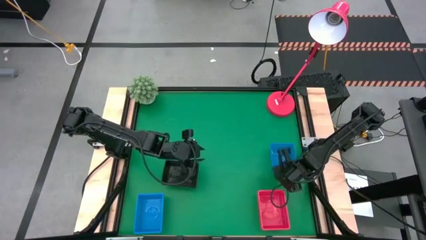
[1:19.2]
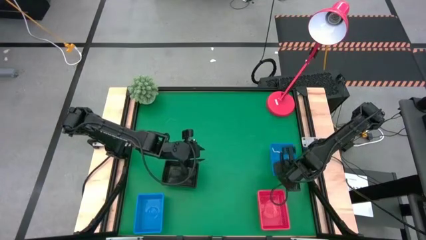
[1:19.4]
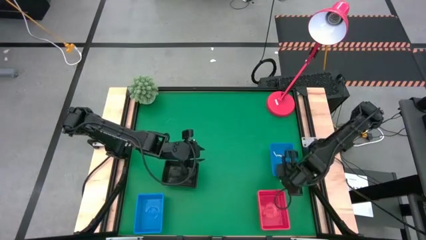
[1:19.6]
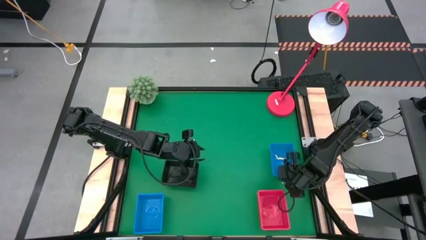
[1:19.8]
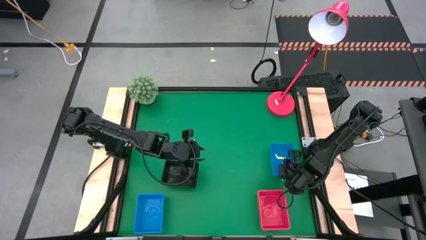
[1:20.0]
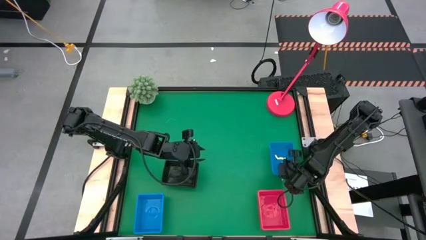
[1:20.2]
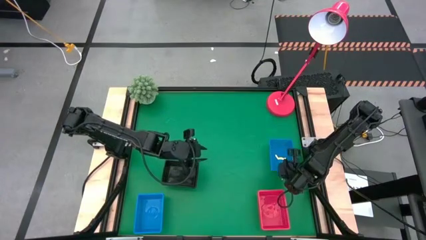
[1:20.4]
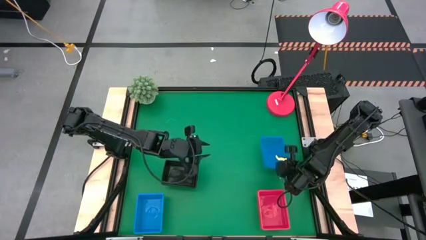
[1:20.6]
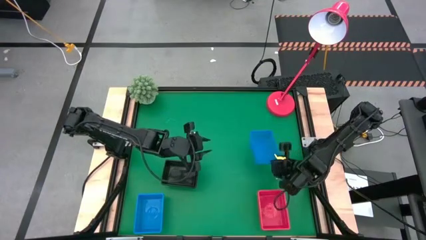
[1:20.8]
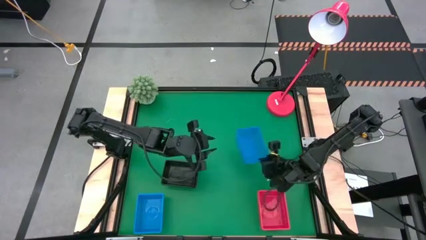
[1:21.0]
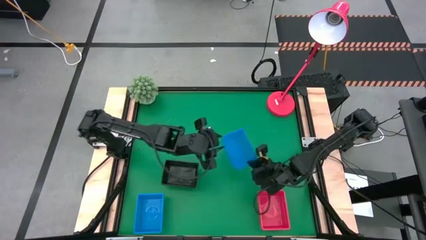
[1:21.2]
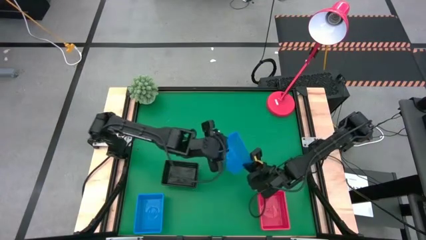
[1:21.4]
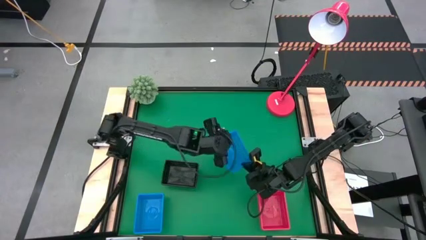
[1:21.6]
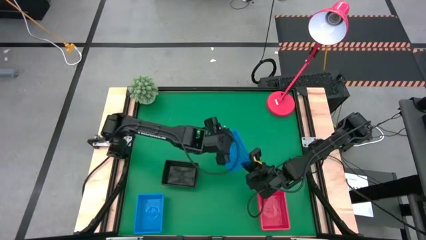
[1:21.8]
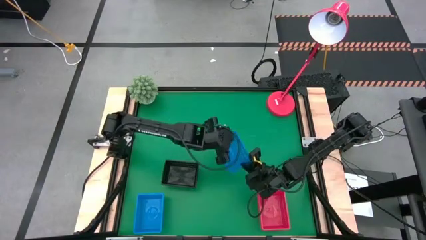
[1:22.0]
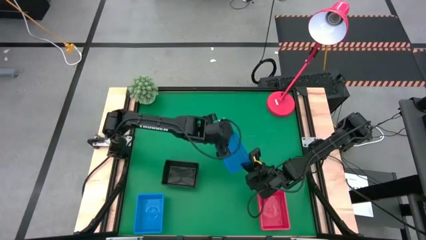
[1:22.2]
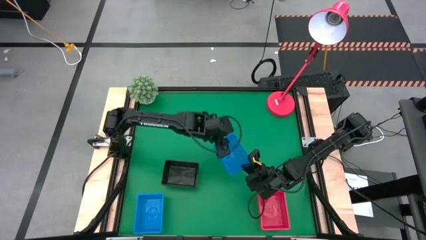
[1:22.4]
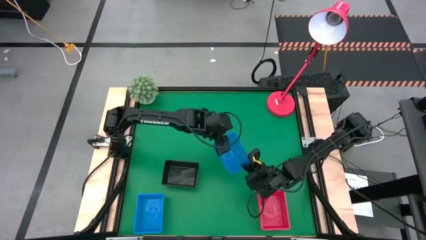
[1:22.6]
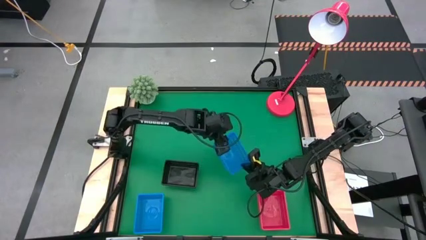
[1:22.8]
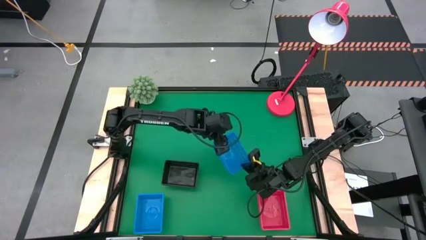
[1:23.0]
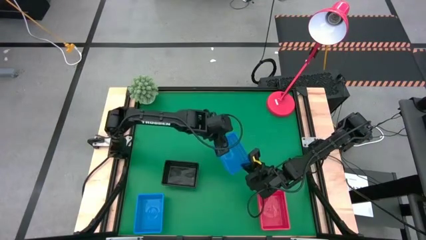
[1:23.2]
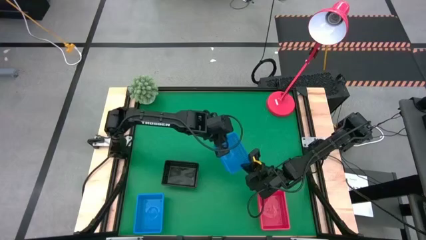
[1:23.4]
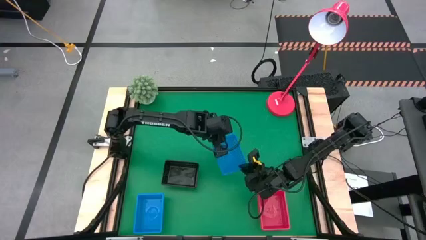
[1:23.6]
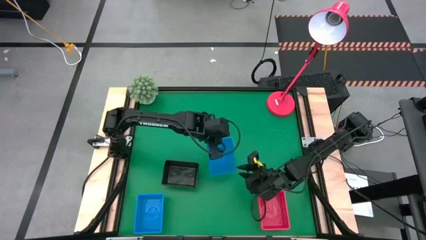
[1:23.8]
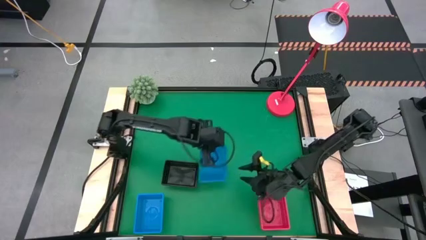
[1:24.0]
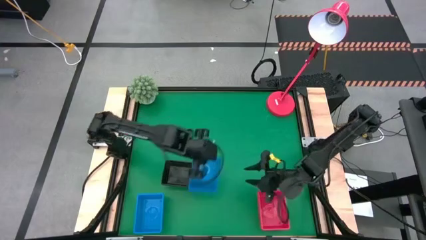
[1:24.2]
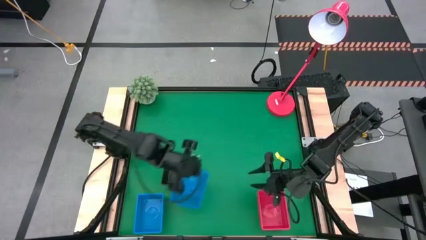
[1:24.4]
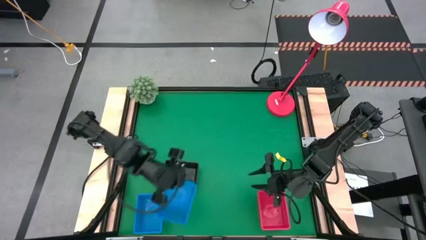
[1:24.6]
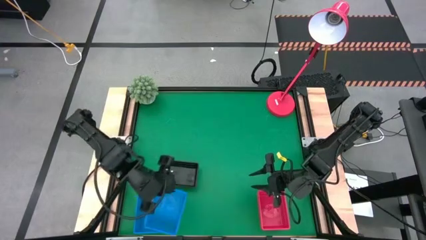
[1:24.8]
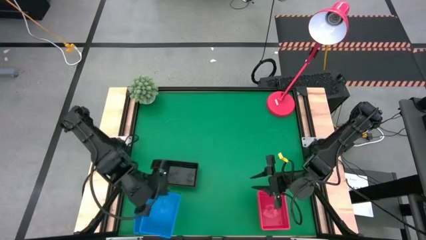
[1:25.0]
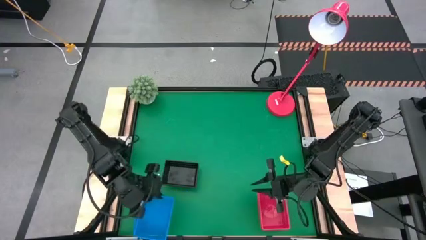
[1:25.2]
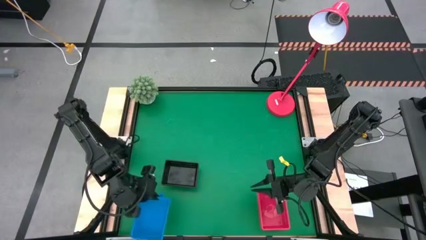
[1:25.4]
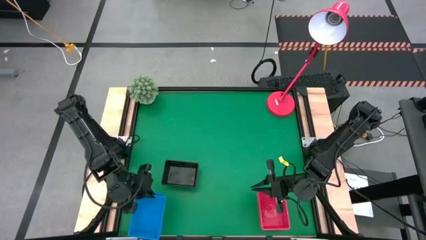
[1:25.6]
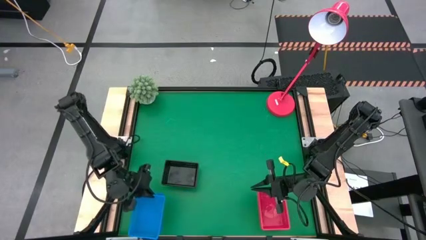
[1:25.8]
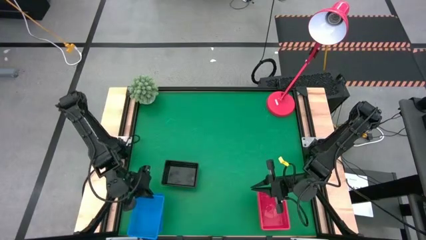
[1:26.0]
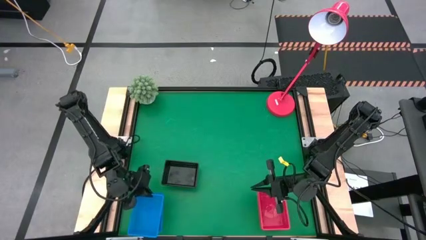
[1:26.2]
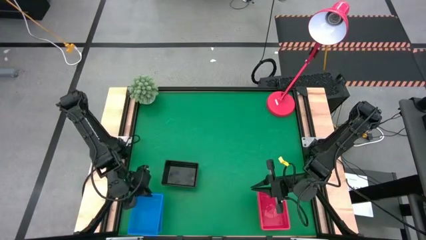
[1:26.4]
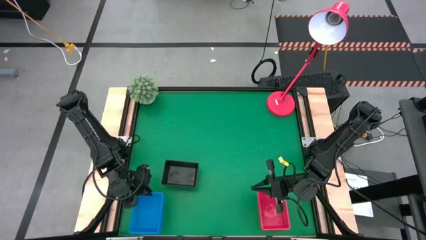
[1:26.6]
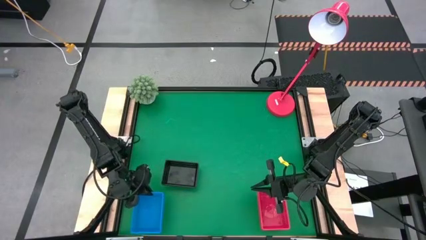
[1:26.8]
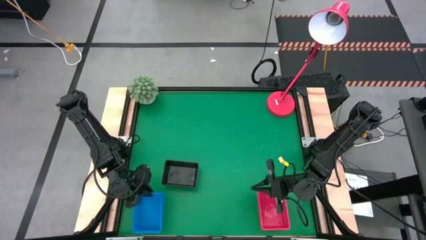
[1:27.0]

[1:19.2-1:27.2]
Stack the right blue bin on the left stacked blue bins

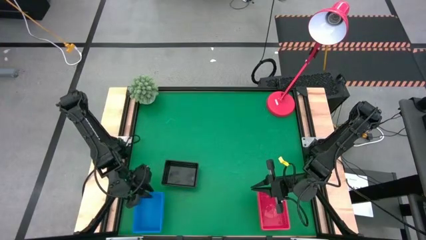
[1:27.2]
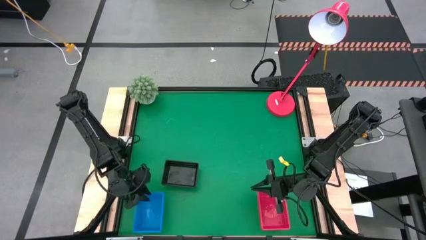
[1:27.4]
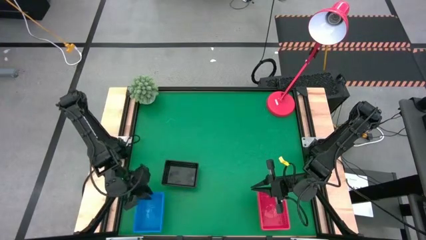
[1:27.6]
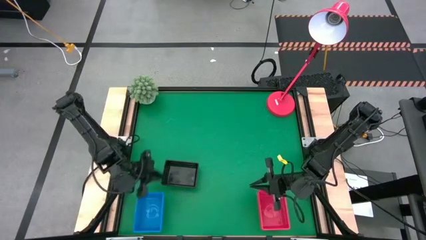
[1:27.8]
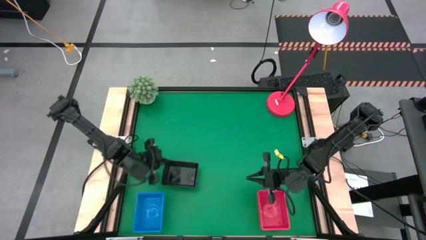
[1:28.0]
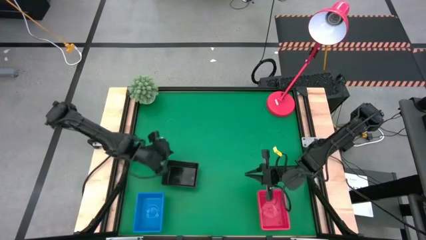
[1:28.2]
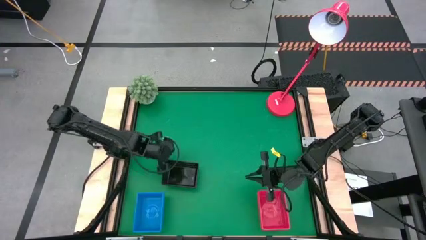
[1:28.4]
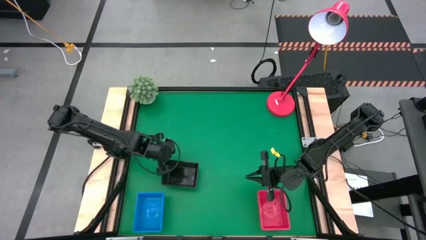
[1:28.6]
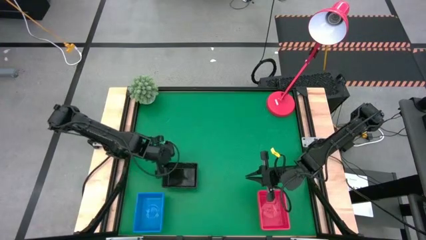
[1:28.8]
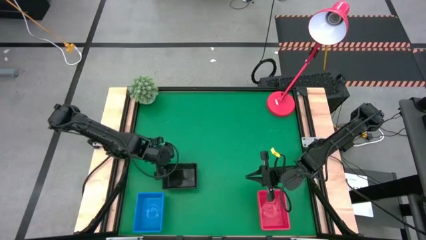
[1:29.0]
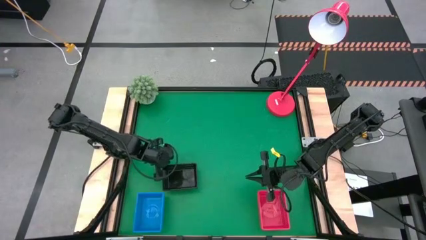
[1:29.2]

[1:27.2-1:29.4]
Adjust the black bins
